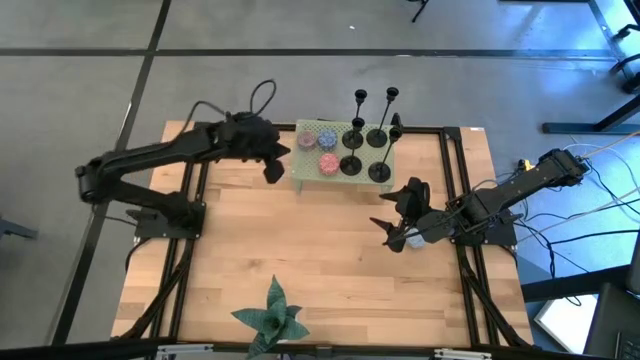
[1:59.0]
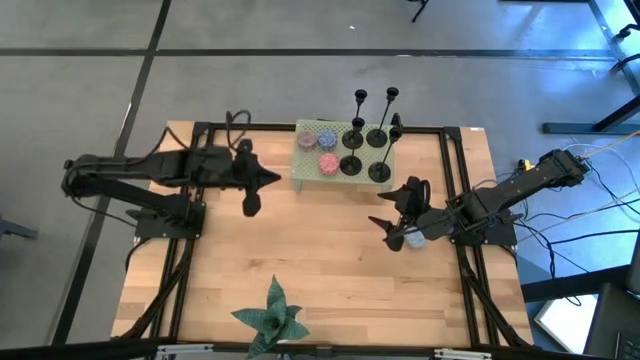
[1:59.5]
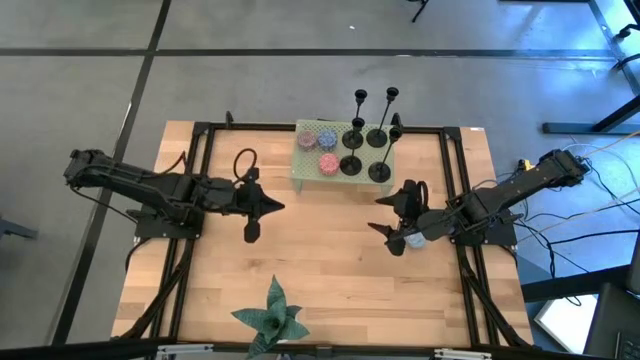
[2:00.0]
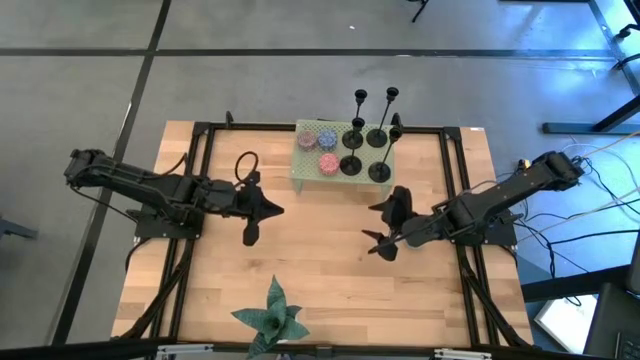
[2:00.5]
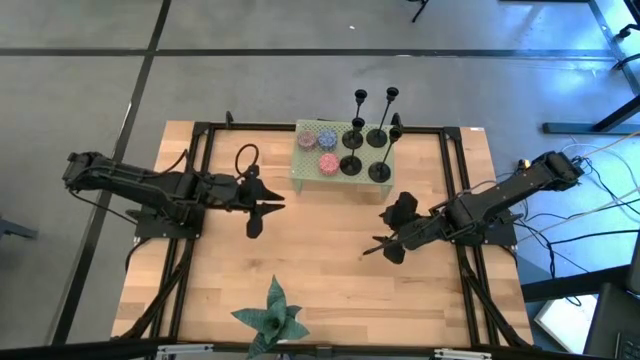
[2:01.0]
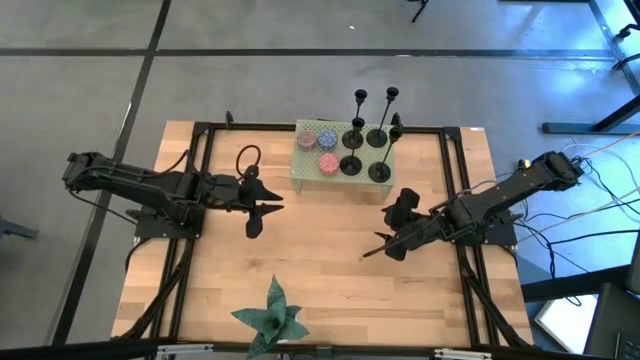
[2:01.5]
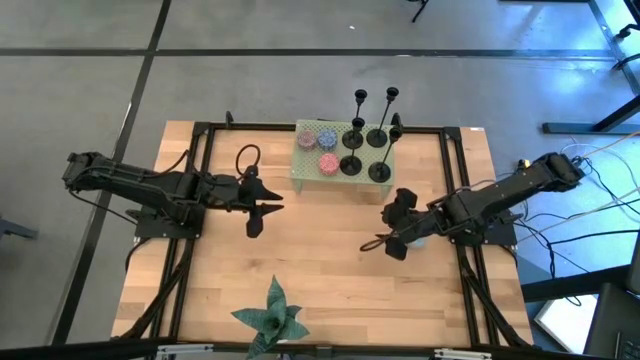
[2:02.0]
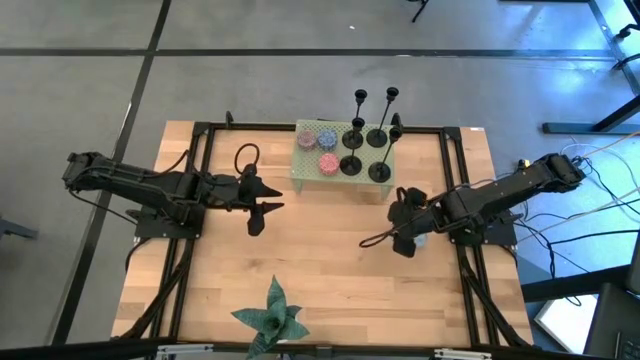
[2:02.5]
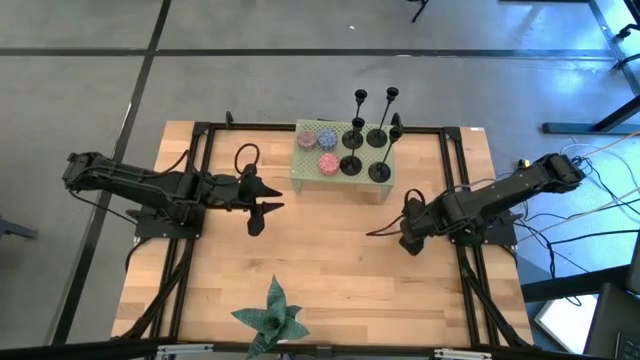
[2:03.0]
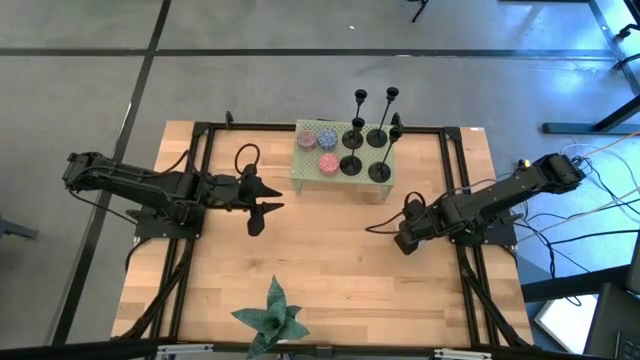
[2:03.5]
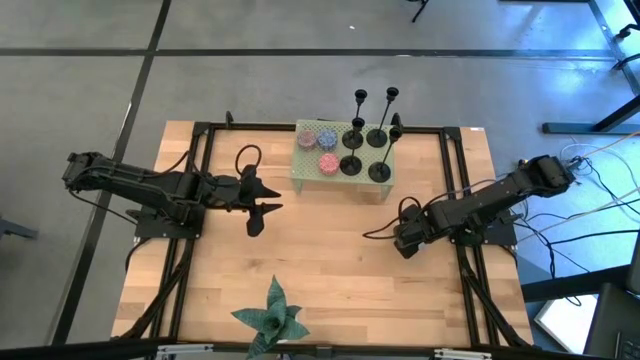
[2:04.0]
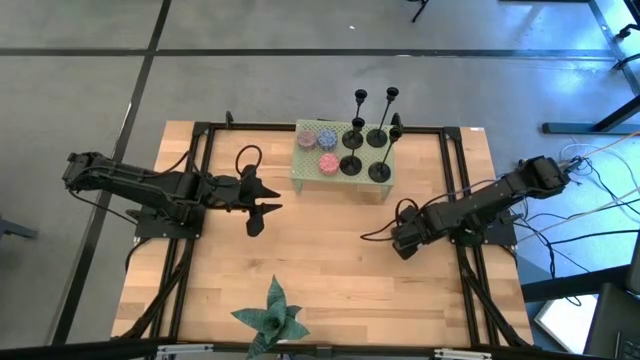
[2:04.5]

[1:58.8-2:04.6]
Task: Pick & Place candle stick holders
Put the light blue scented candle on the shelf

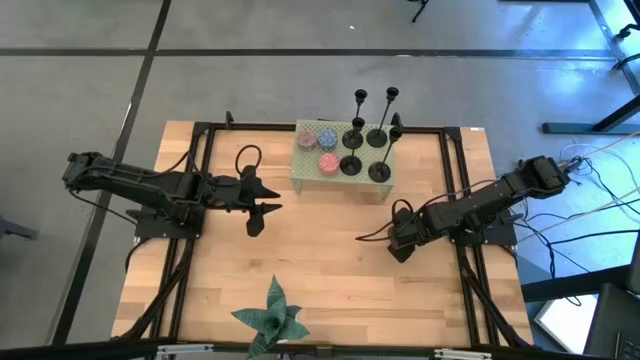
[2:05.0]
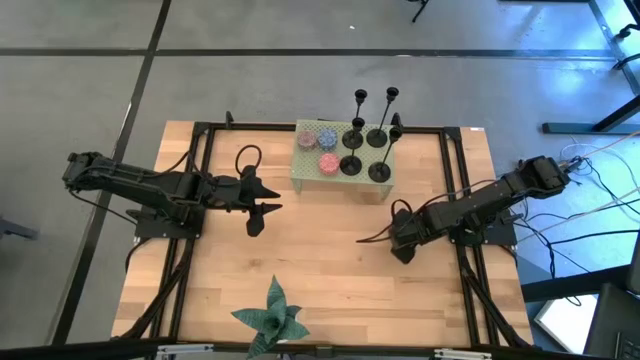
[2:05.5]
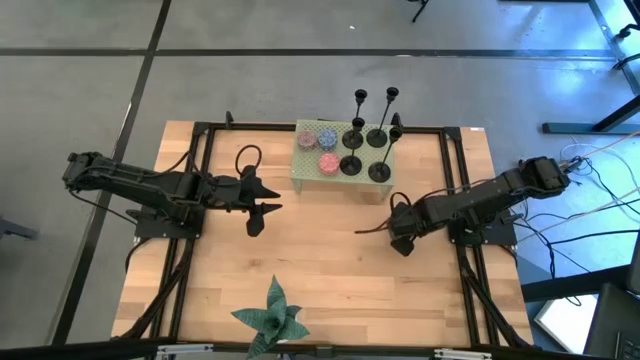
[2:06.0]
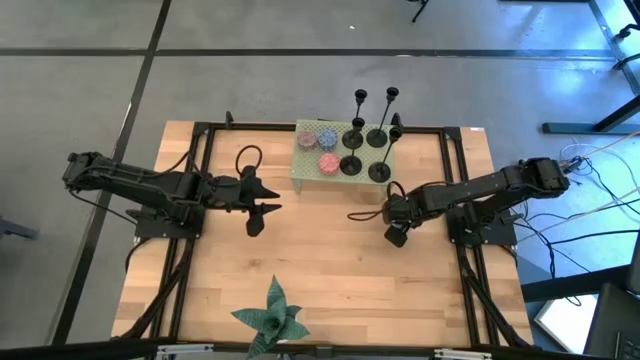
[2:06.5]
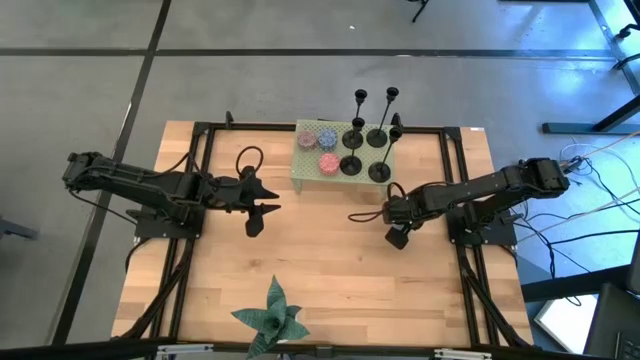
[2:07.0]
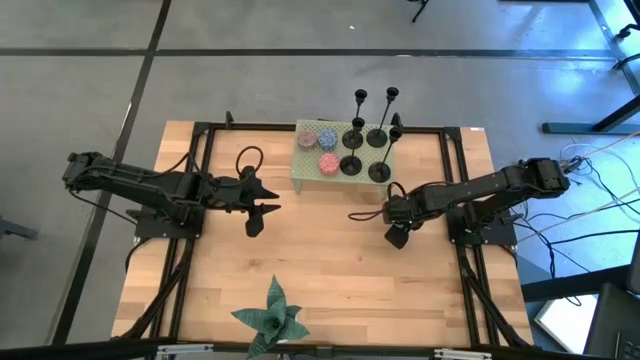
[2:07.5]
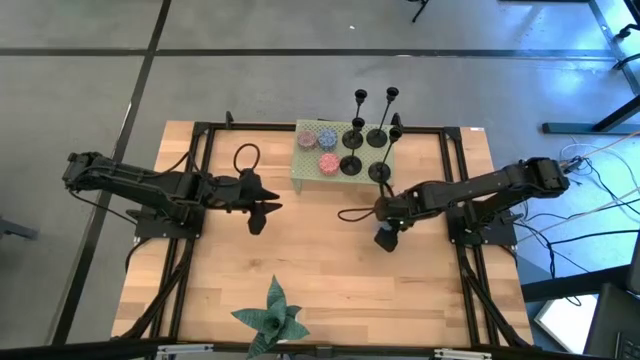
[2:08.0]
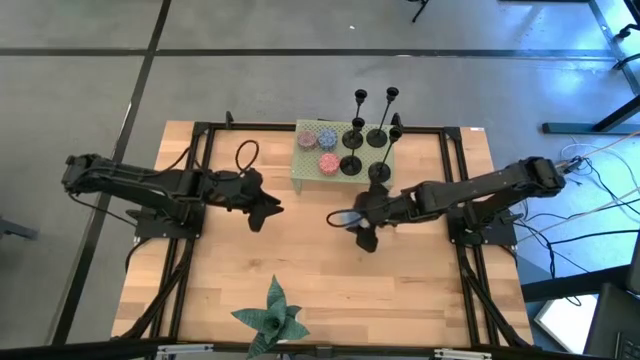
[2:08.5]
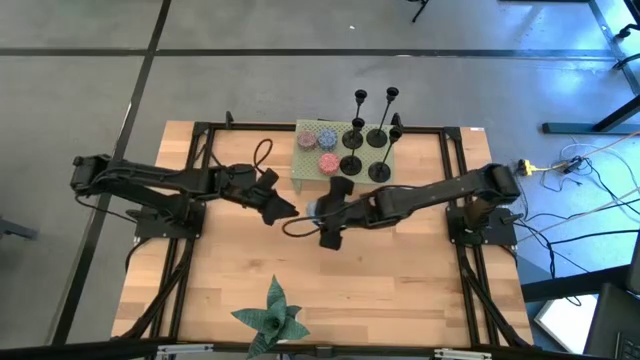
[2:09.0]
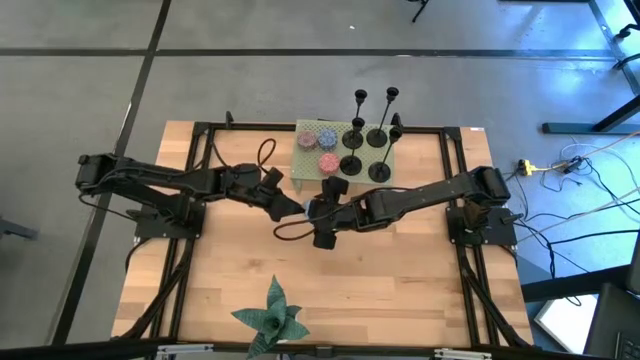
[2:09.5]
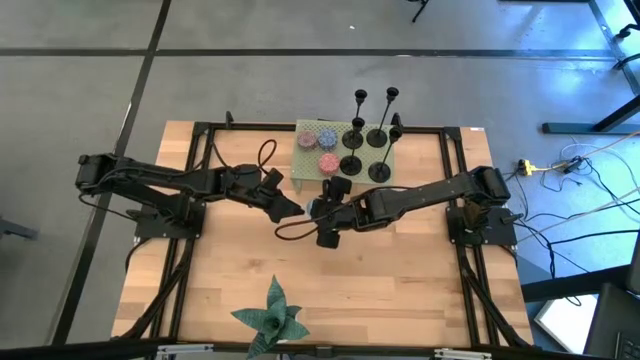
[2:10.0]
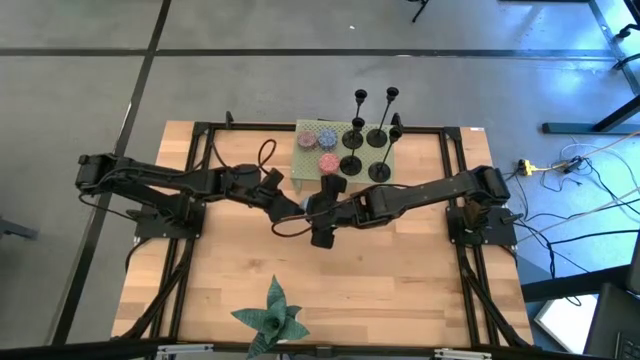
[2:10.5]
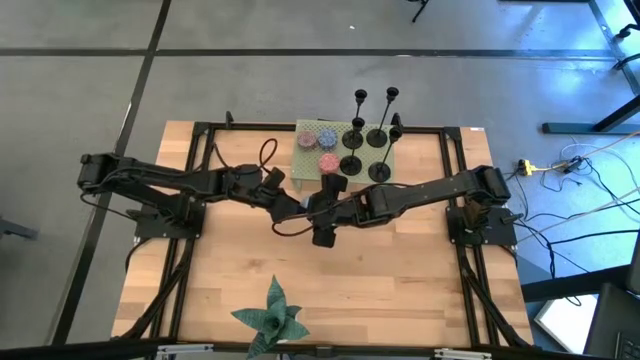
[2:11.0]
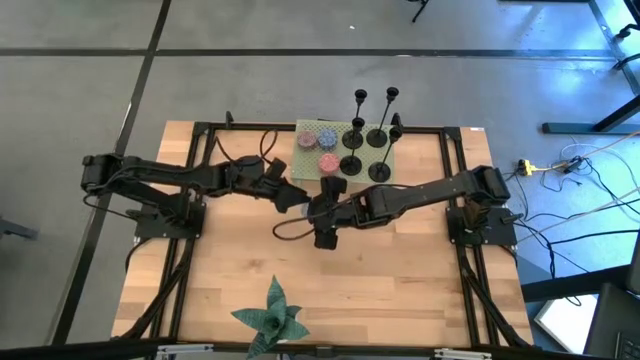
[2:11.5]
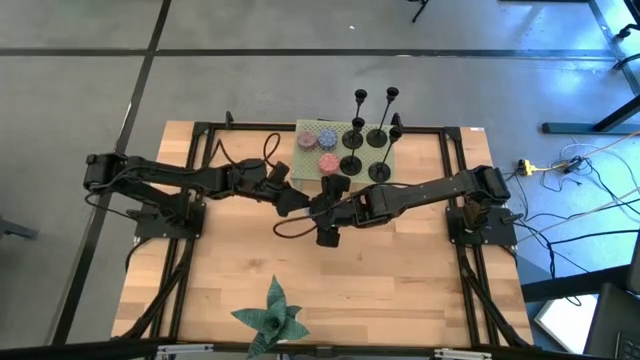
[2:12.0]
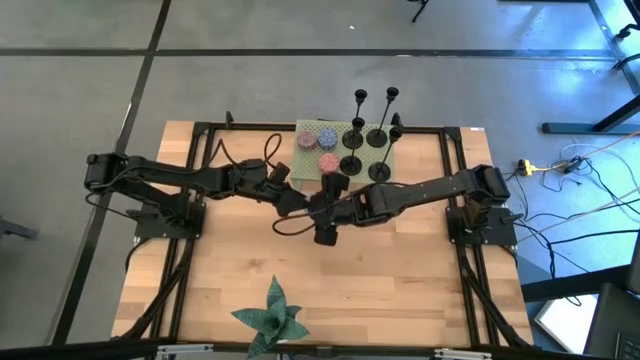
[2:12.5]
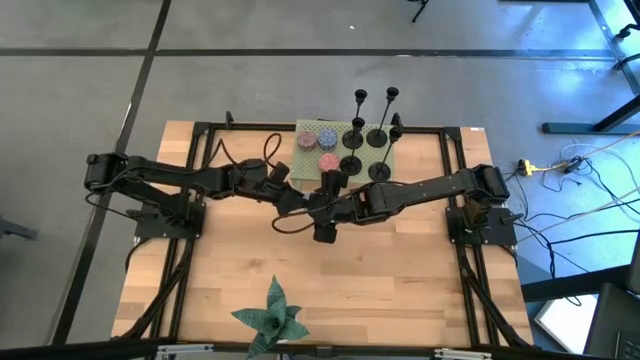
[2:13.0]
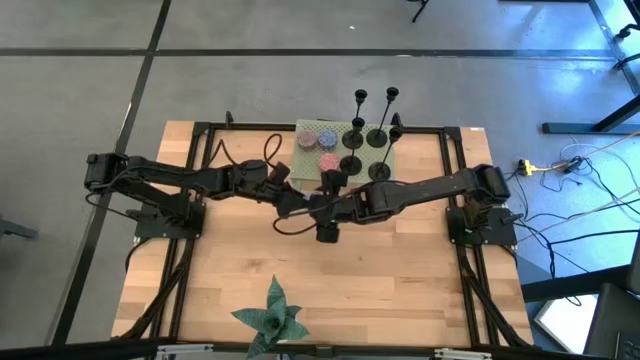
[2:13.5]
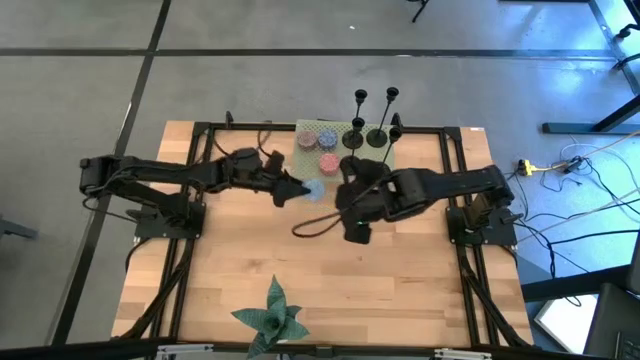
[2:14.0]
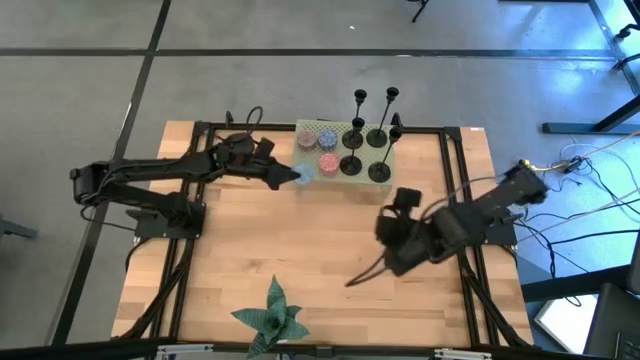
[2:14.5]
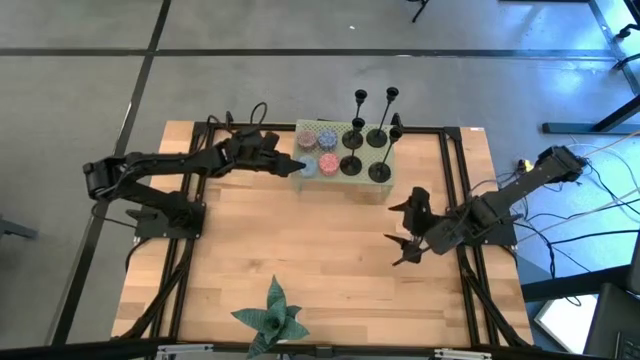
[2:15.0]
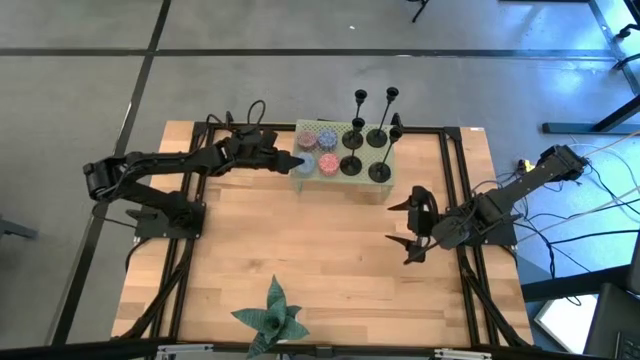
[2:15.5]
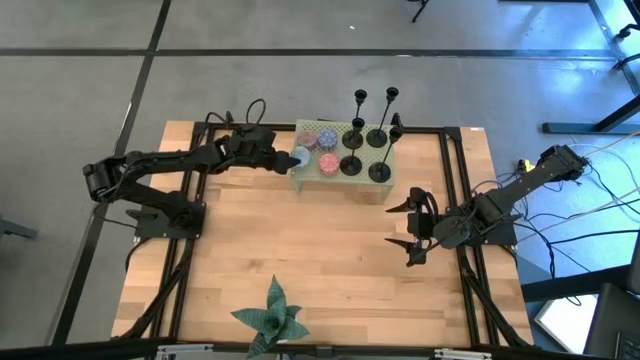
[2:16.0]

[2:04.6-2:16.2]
Put the light blue scented candle on the shelf

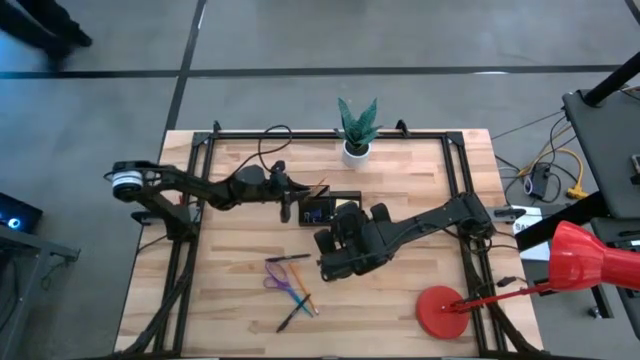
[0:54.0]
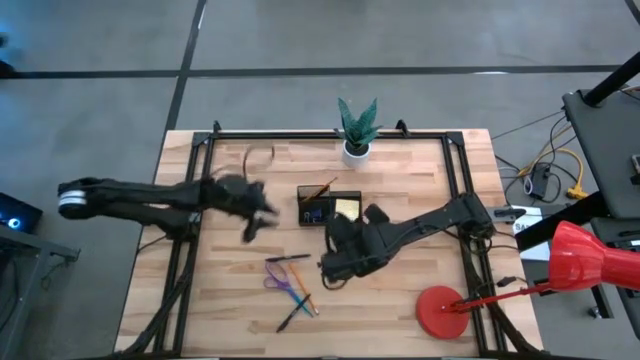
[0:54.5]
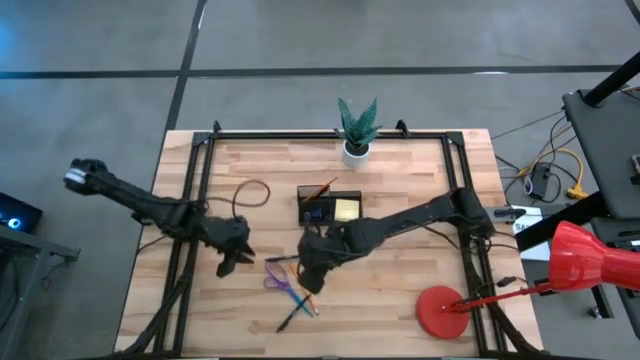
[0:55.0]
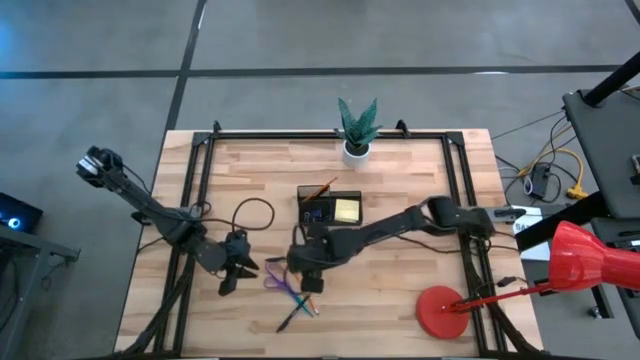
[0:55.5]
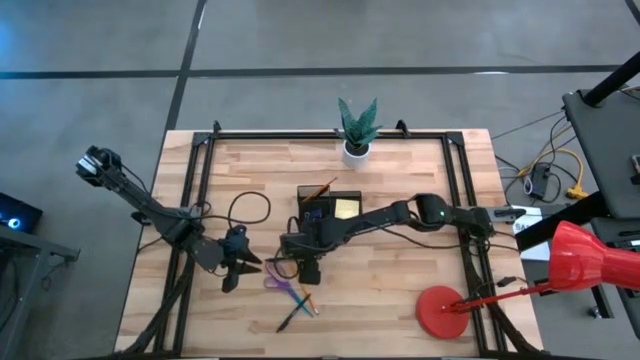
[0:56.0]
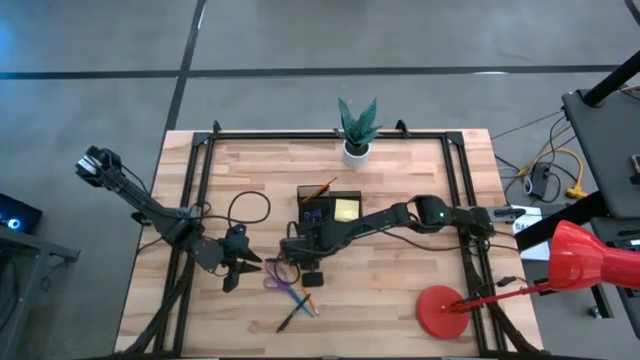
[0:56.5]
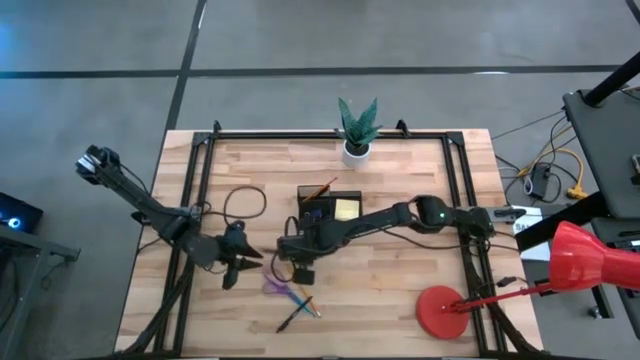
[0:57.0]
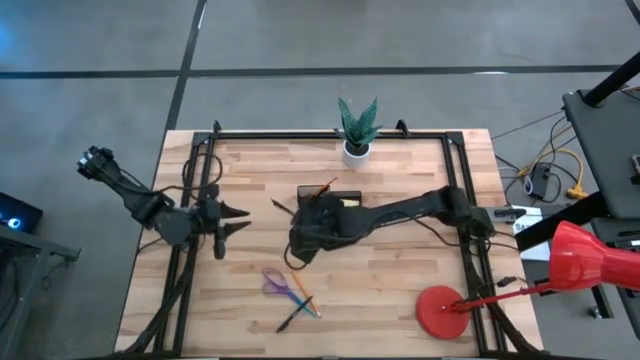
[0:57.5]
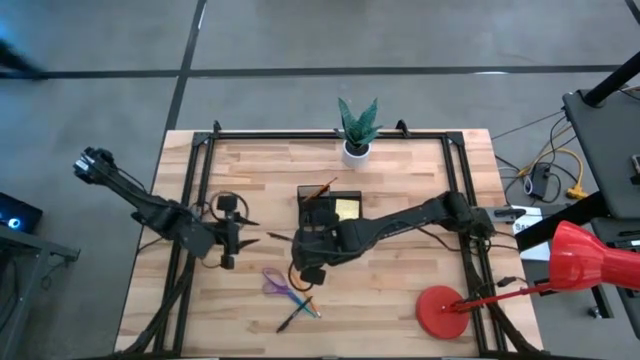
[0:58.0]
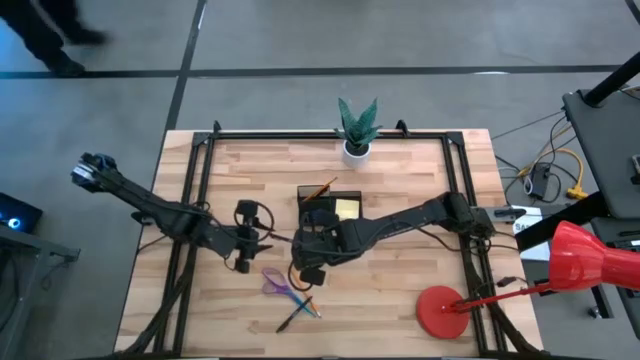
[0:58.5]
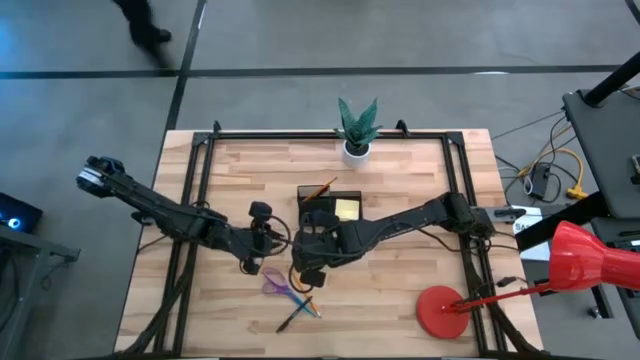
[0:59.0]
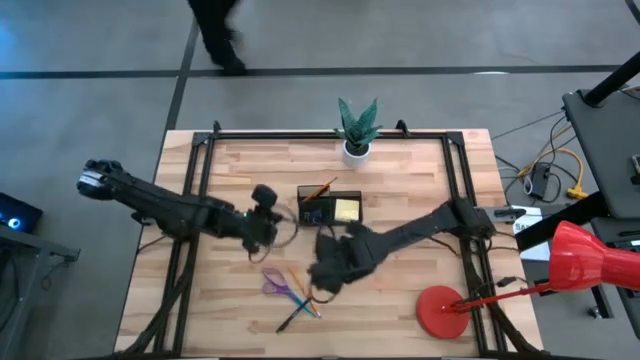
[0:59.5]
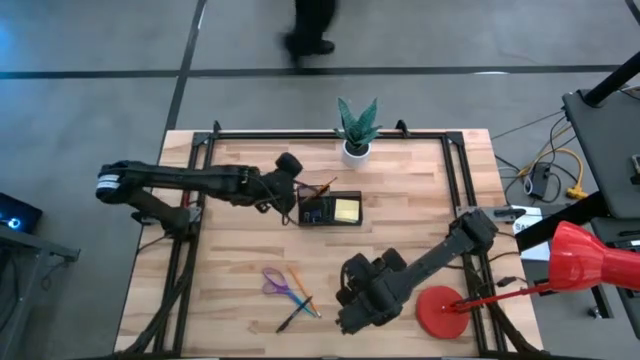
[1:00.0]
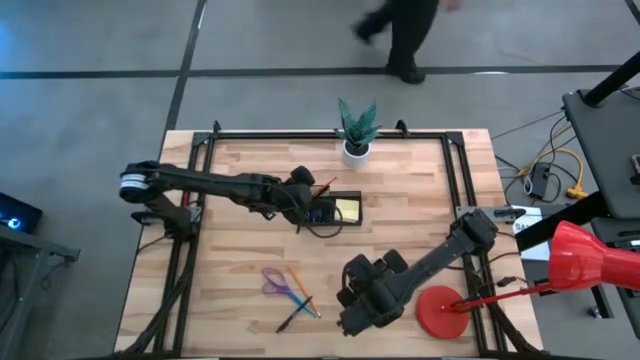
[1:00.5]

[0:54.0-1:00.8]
Task: Pick and place office supplies into organizer
Put the top pen into the desk organizer
